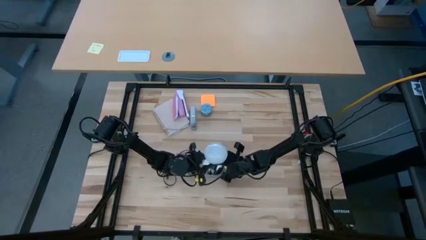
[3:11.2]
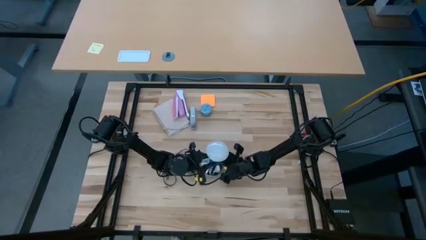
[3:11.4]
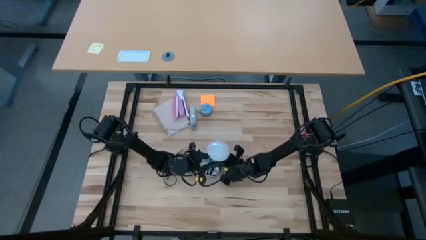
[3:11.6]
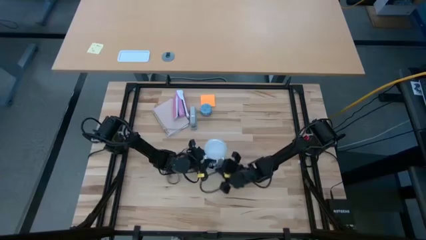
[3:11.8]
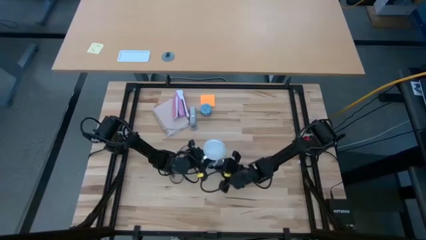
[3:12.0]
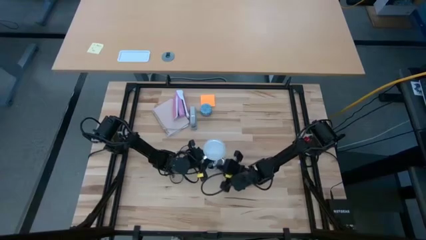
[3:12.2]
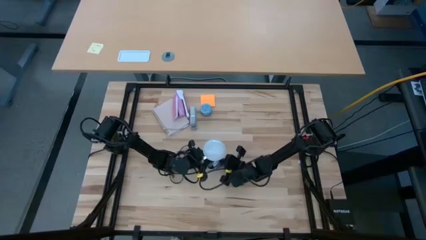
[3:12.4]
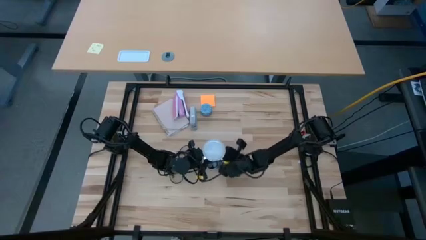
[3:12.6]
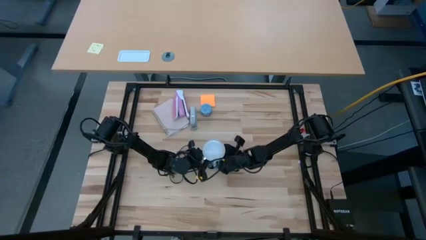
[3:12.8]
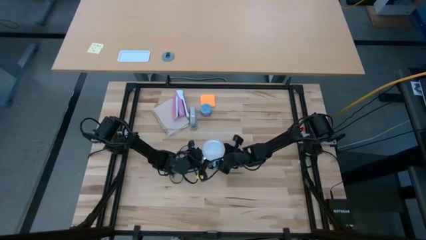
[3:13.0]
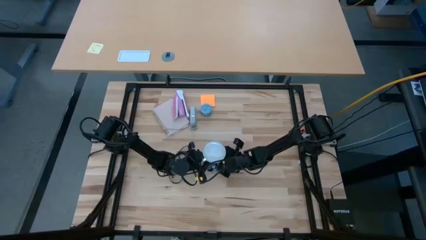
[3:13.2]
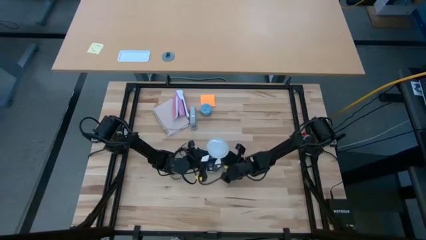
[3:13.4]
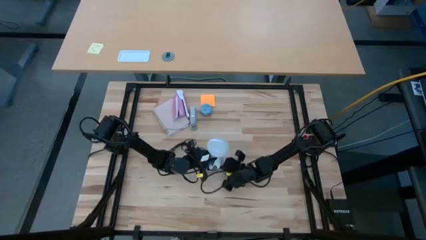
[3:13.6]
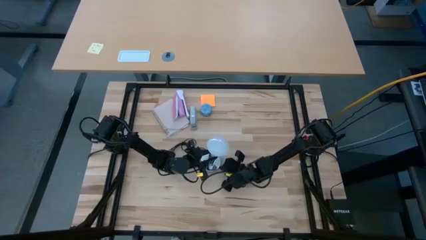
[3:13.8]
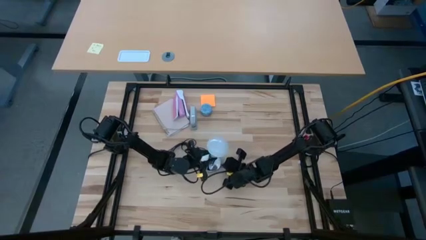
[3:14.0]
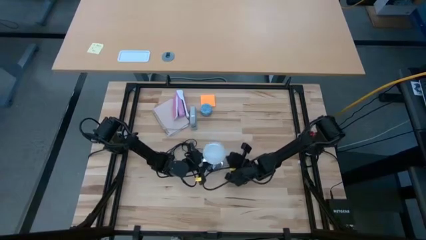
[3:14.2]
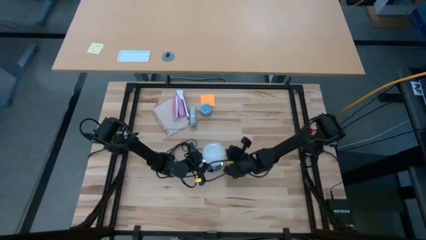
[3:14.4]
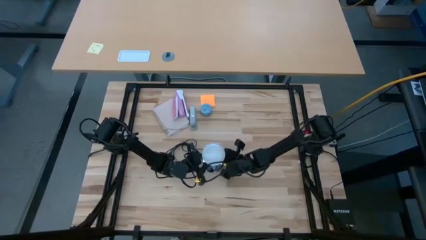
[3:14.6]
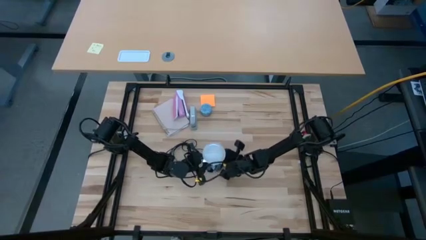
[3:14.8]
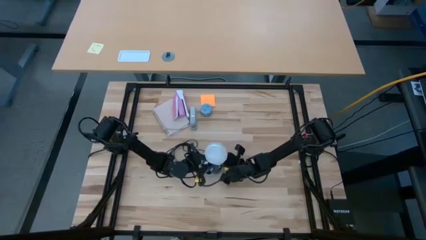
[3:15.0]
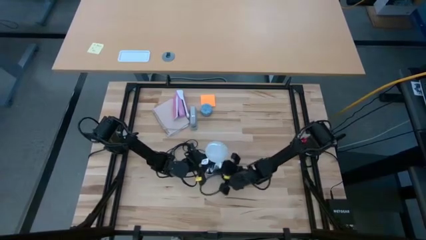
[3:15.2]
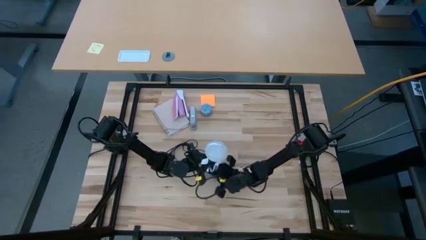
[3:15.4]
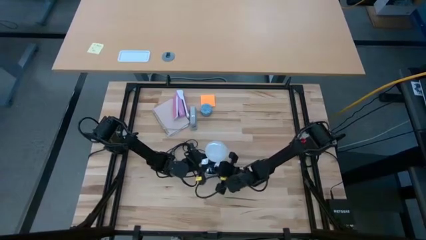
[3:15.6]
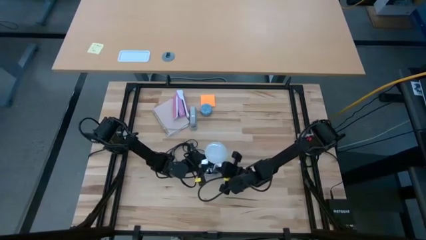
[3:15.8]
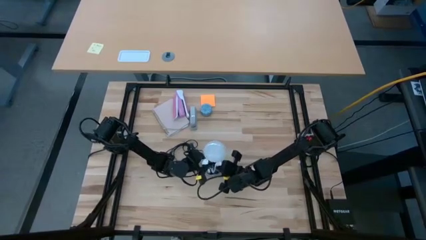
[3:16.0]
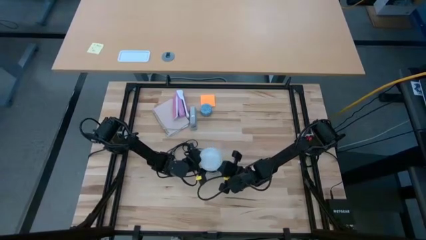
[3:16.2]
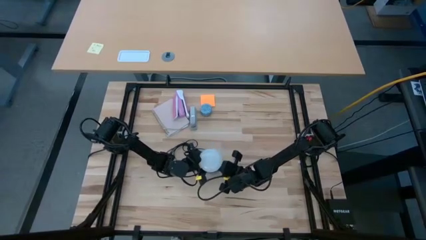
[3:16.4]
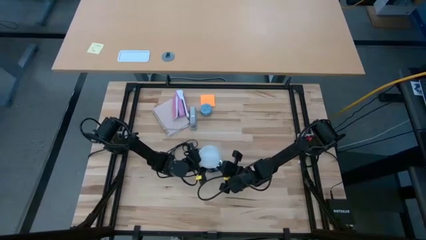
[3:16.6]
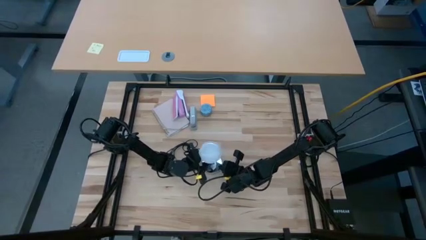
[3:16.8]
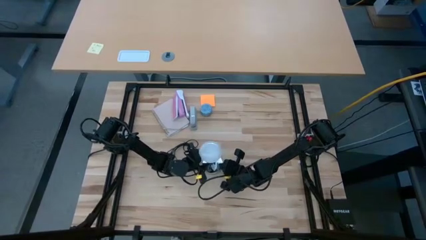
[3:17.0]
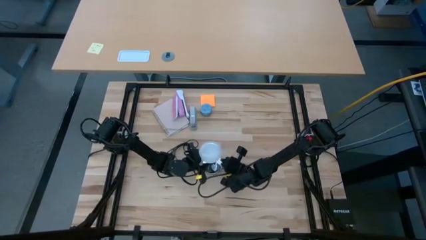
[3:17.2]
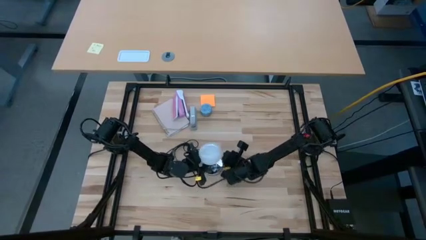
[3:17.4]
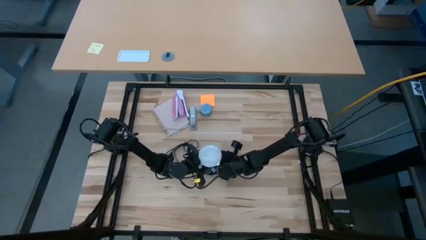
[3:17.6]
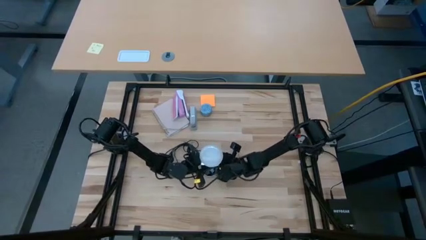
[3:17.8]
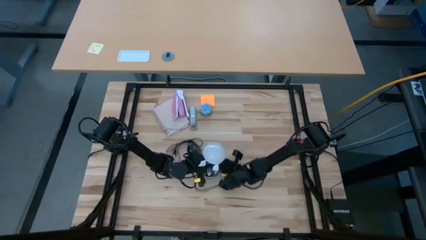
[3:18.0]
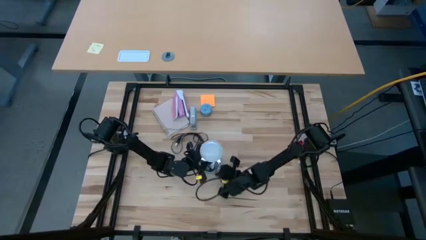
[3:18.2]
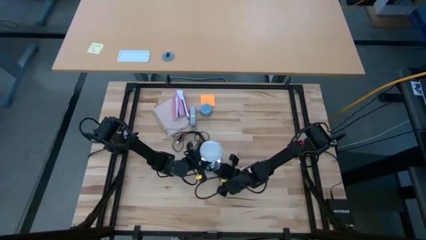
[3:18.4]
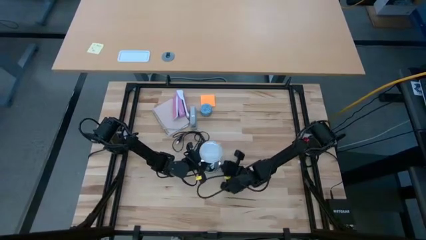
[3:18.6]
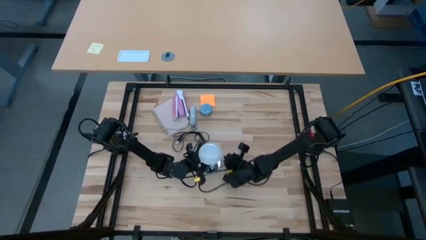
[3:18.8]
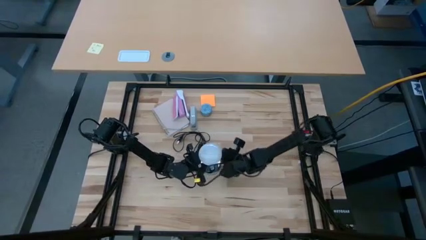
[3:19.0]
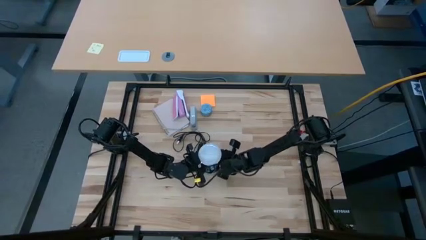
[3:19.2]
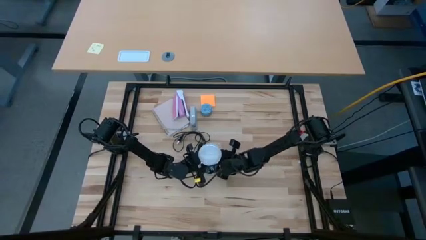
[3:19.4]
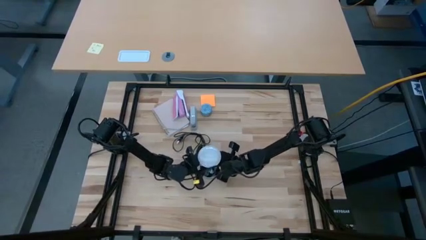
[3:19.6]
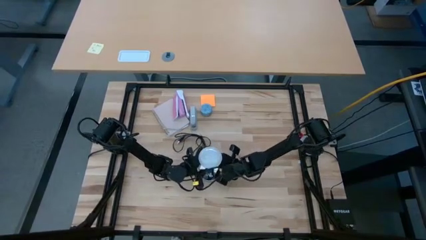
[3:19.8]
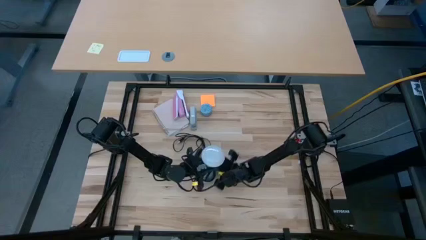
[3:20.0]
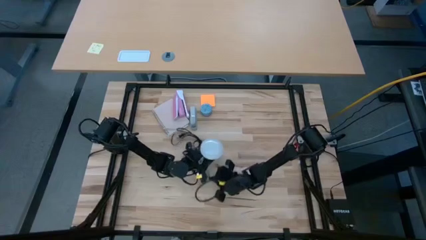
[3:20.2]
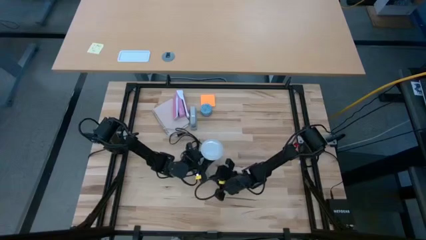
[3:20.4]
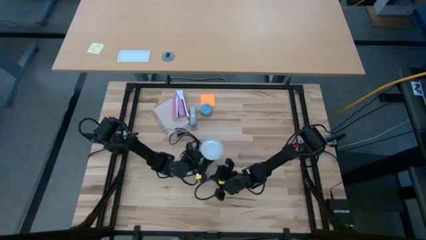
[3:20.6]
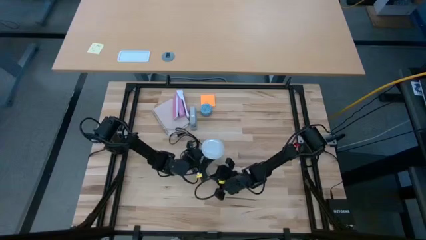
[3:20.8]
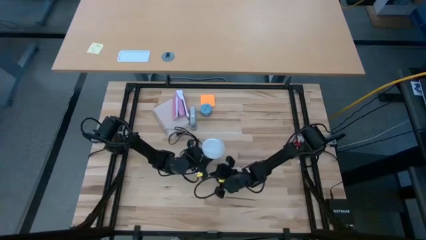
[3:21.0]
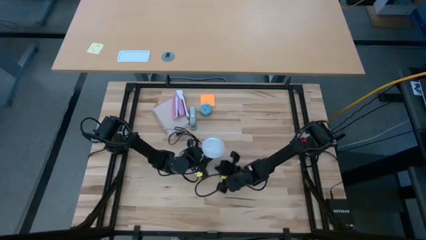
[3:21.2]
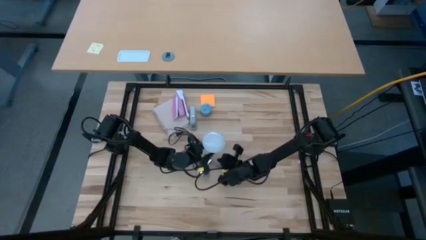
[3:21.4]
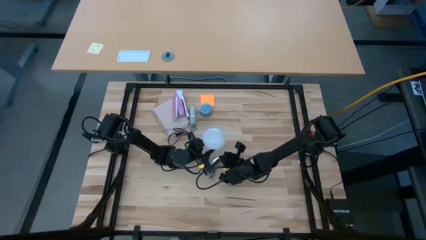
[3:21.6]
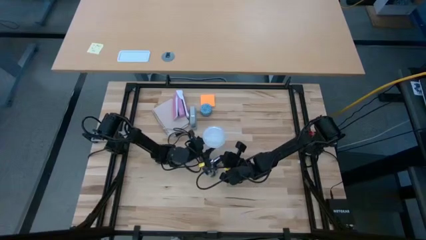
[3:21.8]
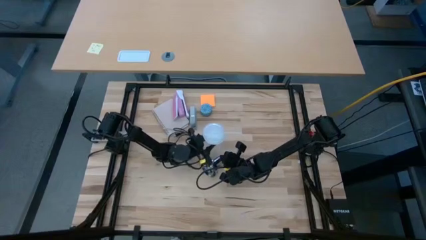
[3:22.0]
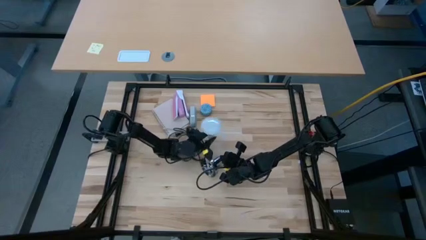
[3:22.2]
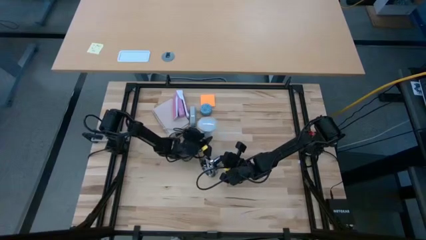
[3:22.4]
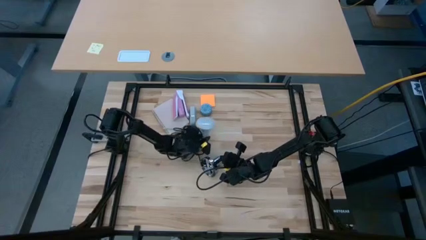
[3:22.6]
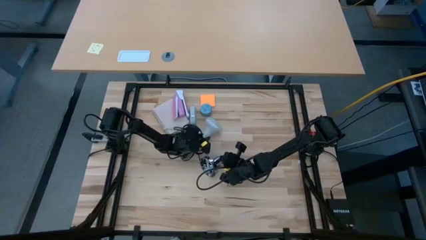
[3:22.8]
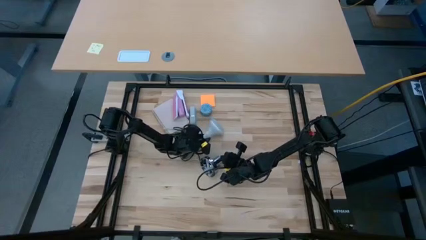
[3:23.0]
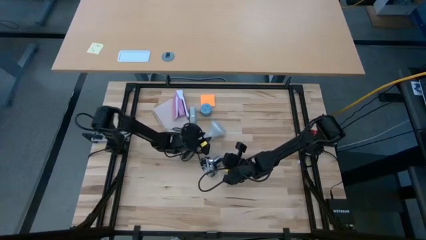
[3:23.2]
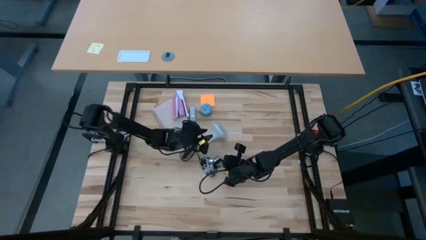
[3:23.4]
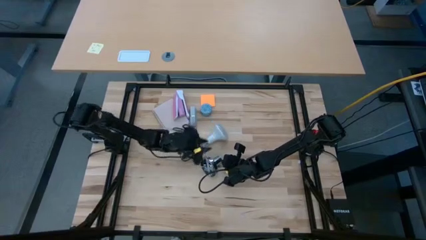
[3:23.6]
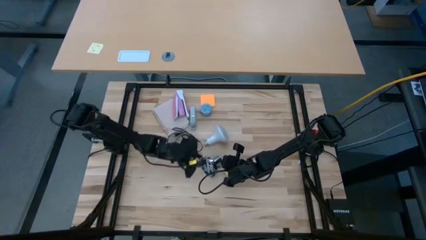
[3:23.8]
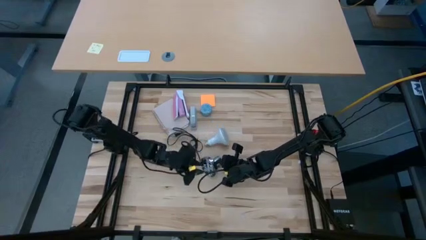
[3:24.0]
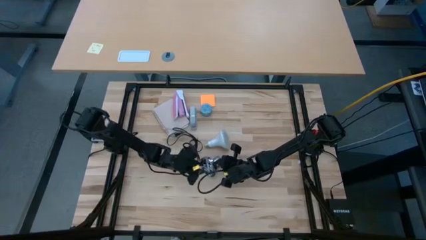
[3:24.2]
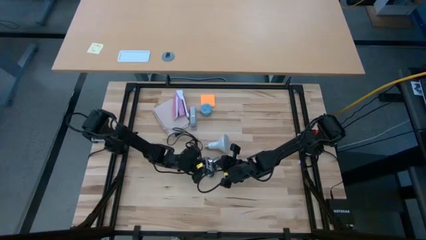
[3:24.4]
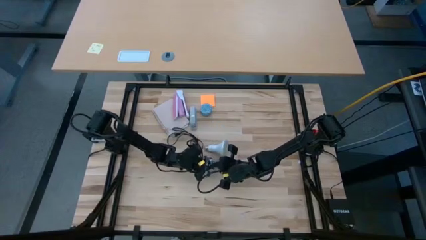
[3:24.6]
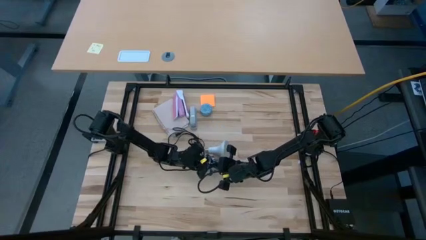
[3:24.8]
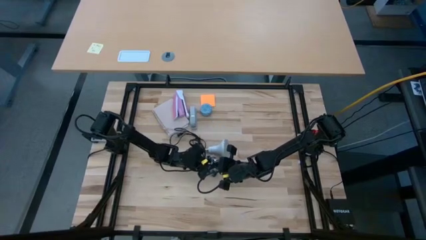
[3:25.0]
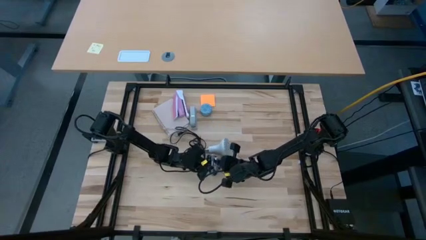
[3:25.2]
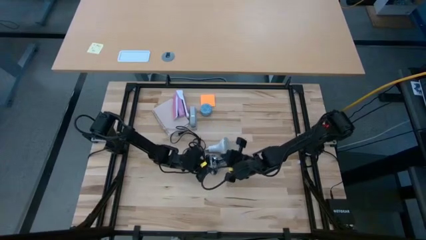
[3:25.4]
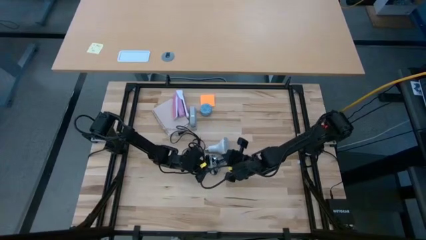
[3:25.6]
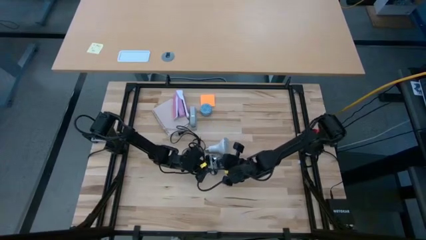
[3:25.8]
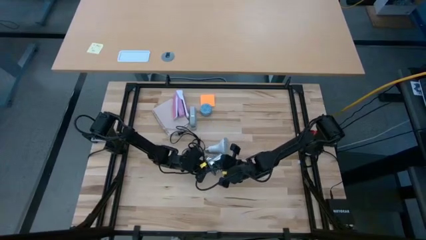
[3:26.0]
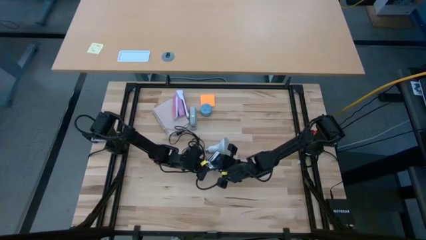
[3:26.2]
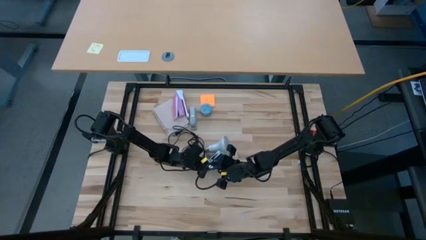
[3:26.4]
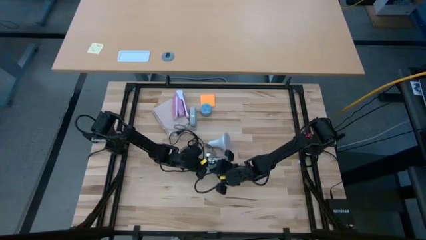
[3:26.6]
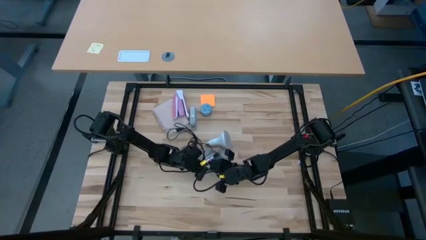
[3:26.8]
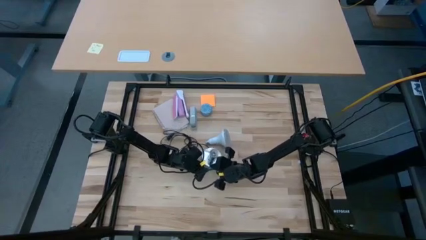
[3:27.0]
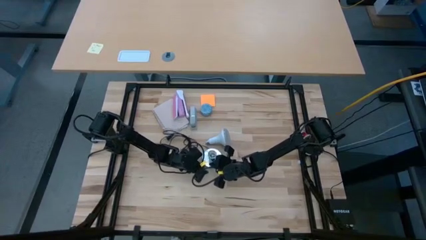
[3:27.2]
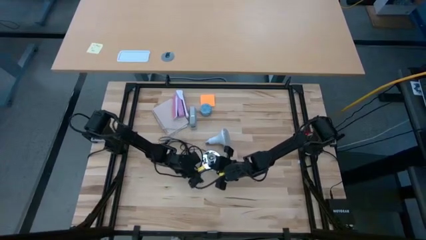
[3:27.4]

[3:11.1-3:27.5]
Task: Screw lightbulb
Remove the white lightbulb from the silver lamp
